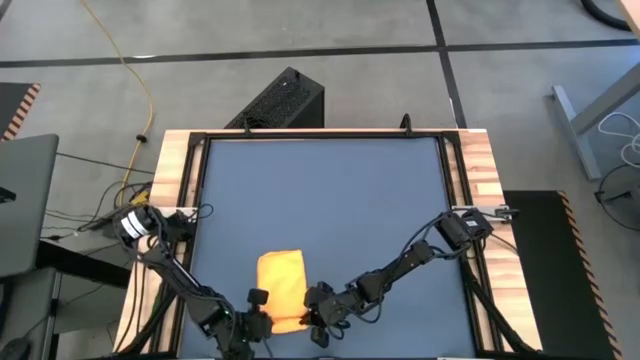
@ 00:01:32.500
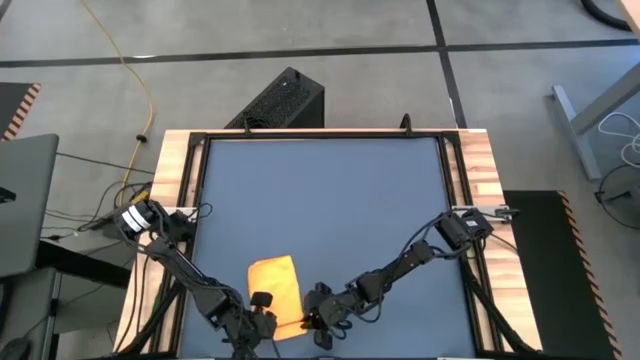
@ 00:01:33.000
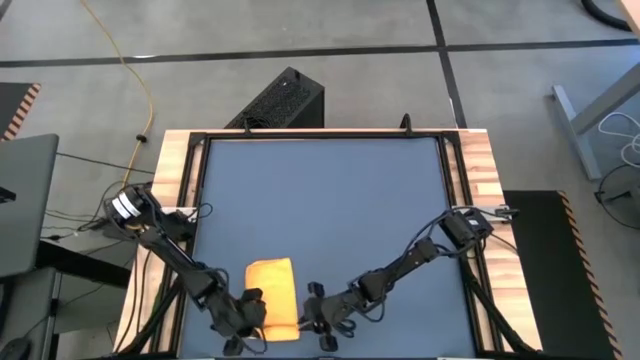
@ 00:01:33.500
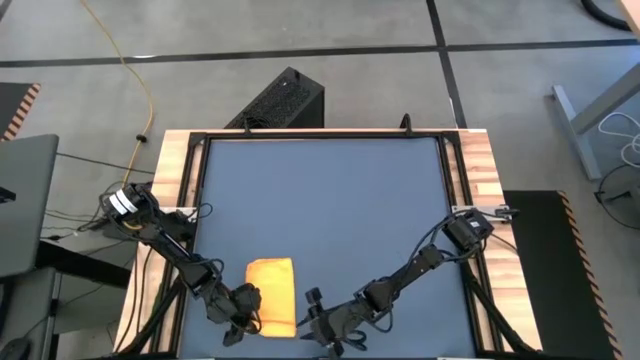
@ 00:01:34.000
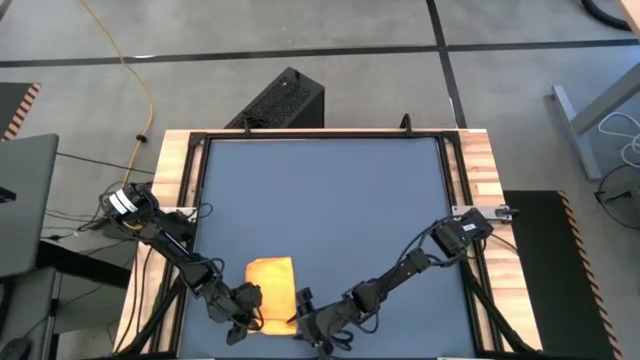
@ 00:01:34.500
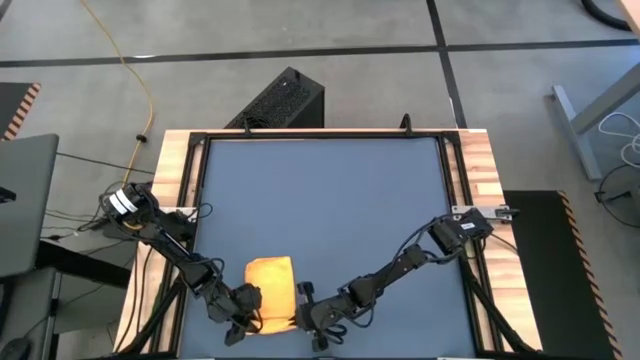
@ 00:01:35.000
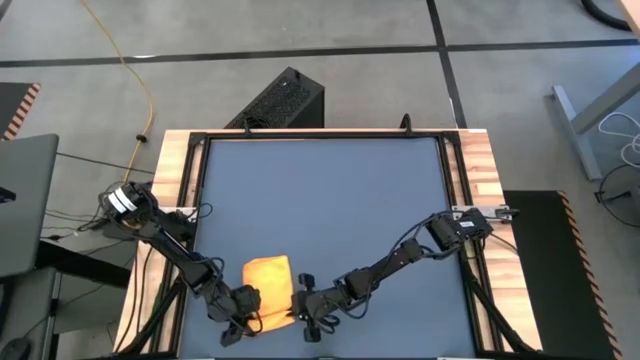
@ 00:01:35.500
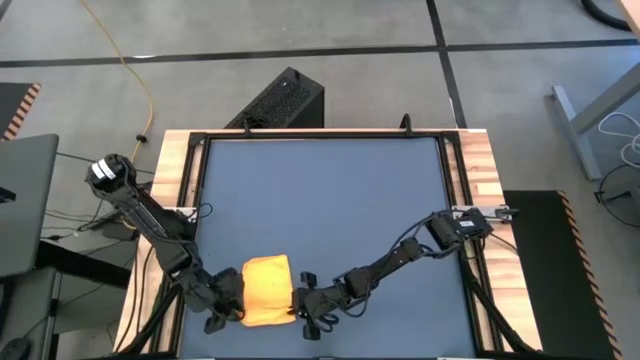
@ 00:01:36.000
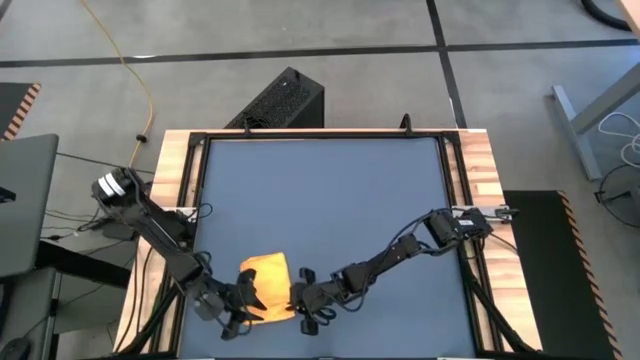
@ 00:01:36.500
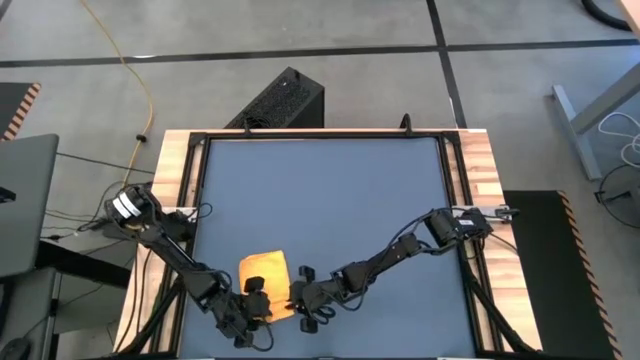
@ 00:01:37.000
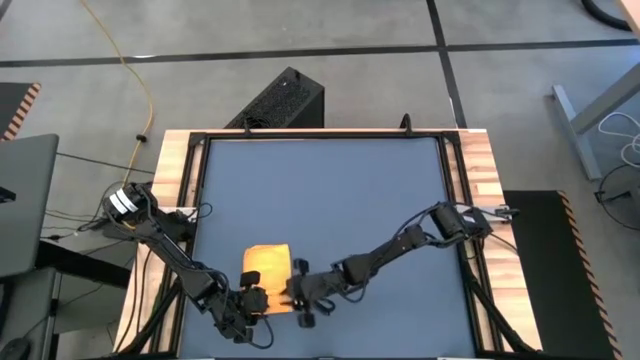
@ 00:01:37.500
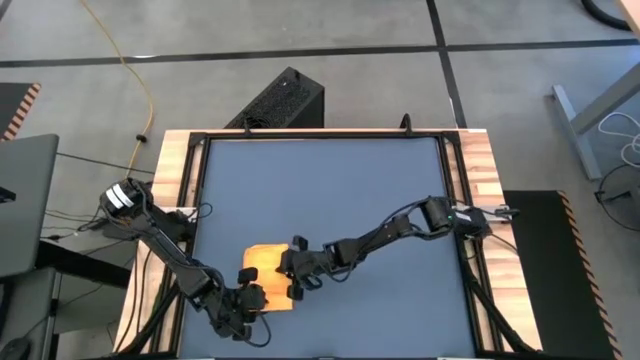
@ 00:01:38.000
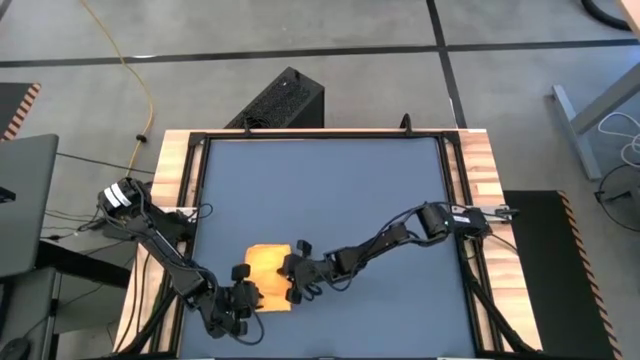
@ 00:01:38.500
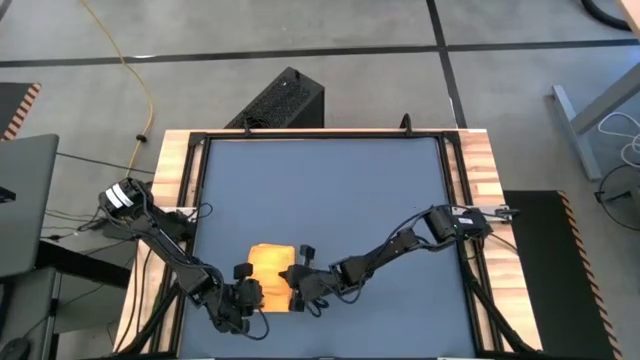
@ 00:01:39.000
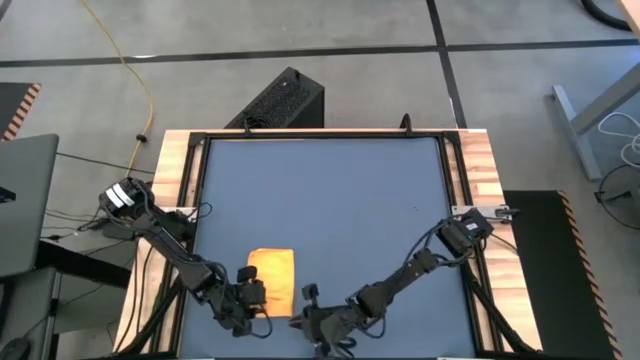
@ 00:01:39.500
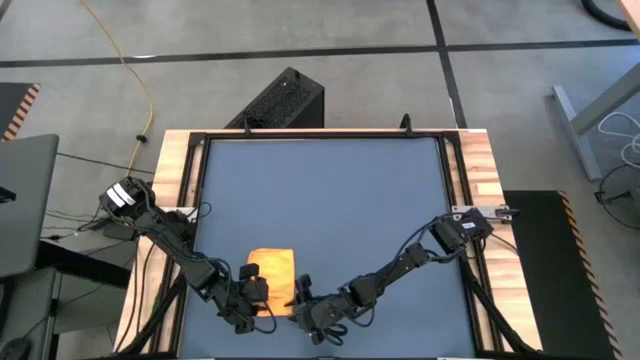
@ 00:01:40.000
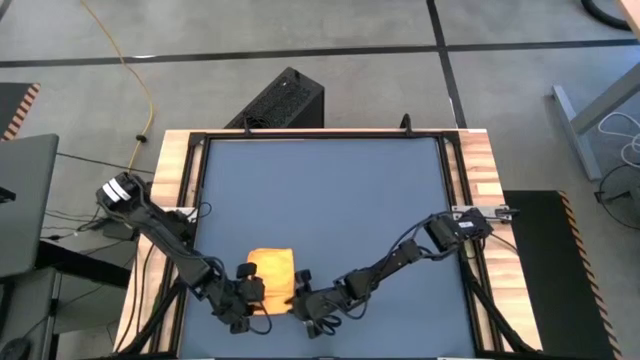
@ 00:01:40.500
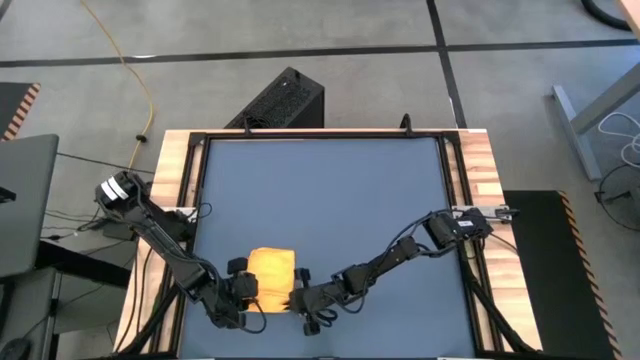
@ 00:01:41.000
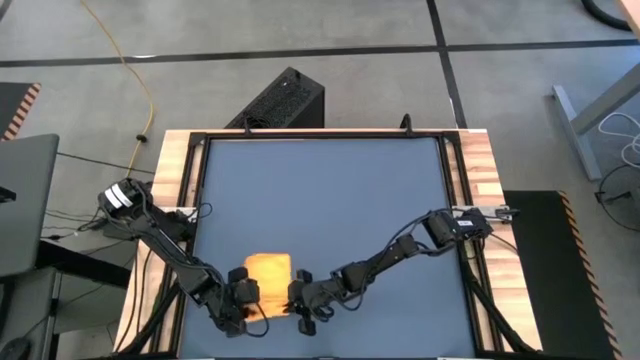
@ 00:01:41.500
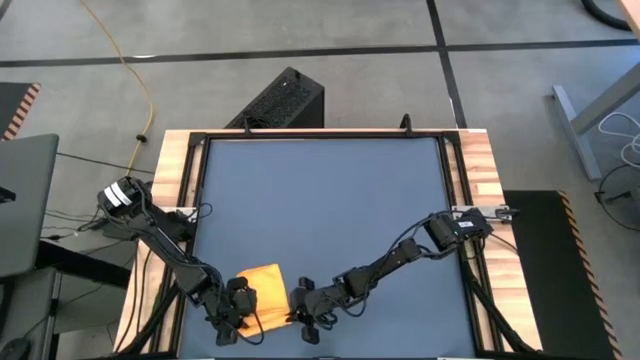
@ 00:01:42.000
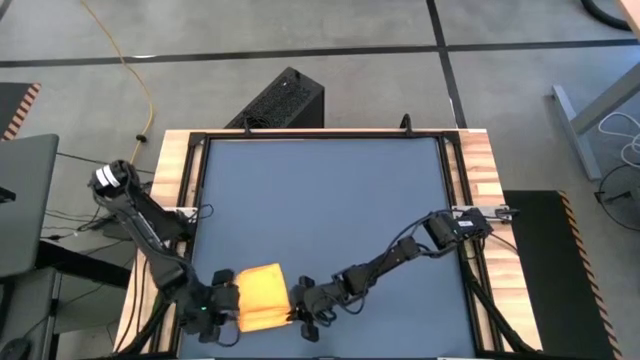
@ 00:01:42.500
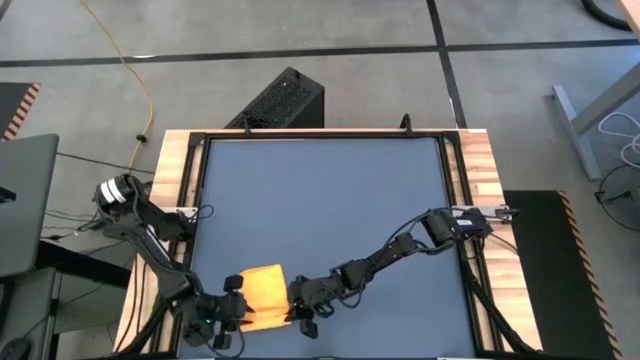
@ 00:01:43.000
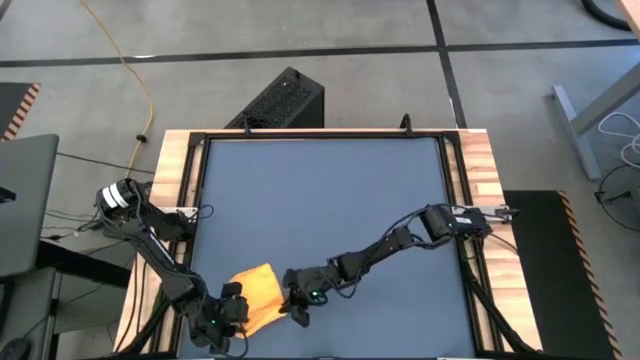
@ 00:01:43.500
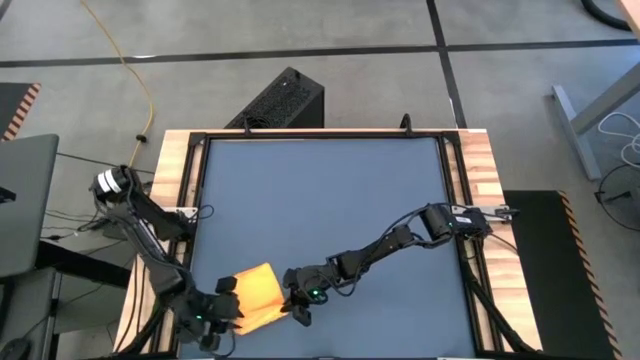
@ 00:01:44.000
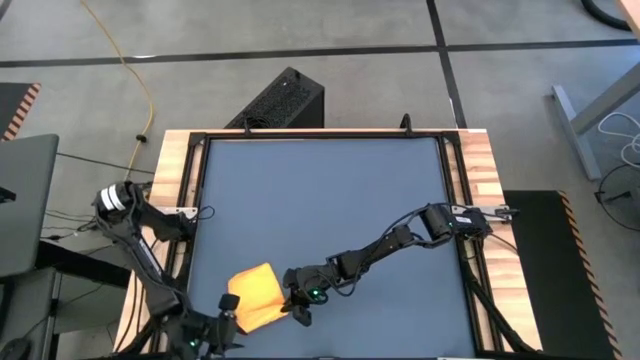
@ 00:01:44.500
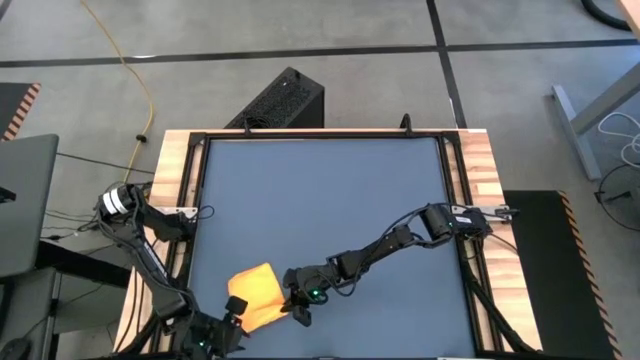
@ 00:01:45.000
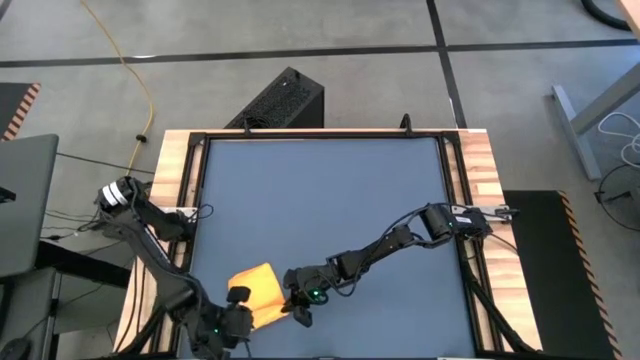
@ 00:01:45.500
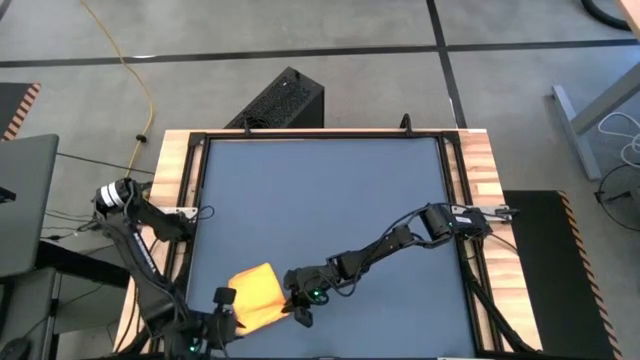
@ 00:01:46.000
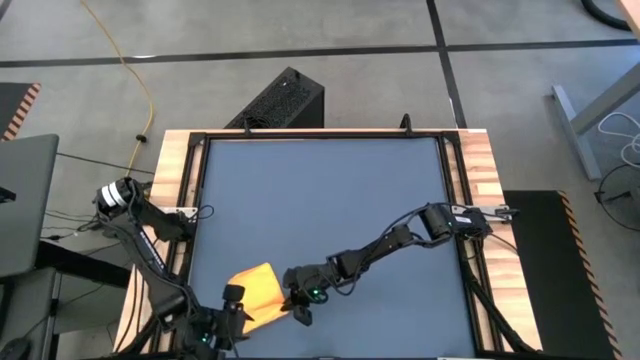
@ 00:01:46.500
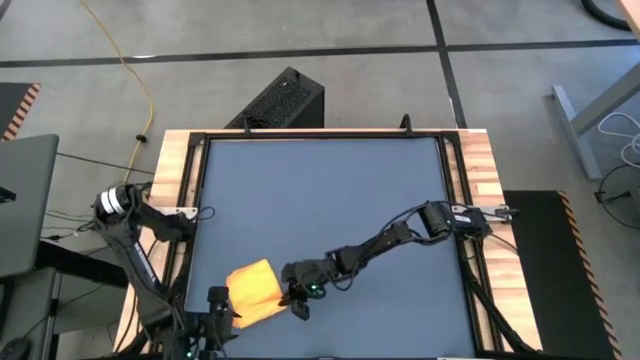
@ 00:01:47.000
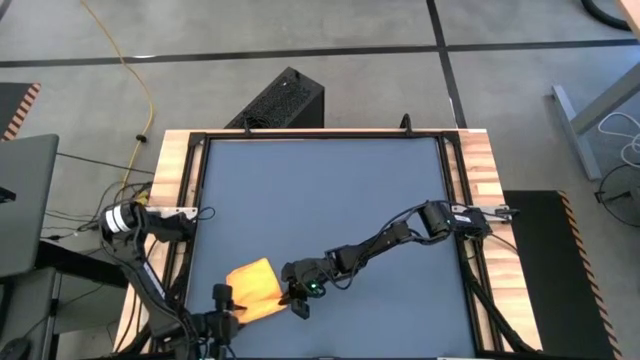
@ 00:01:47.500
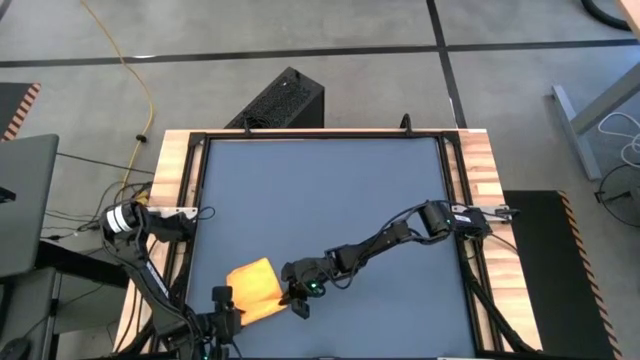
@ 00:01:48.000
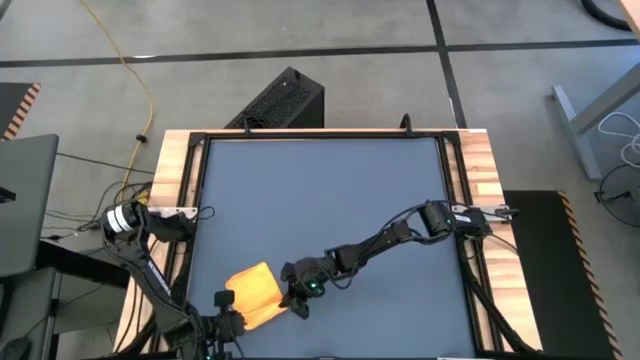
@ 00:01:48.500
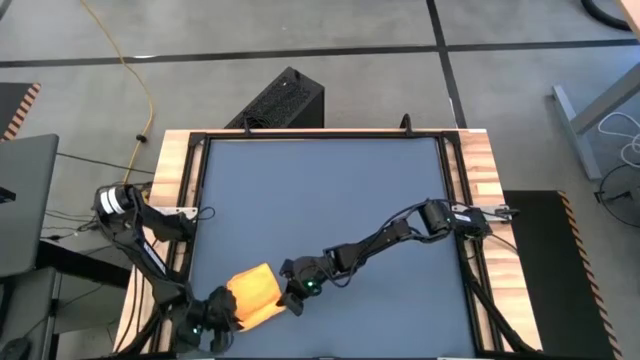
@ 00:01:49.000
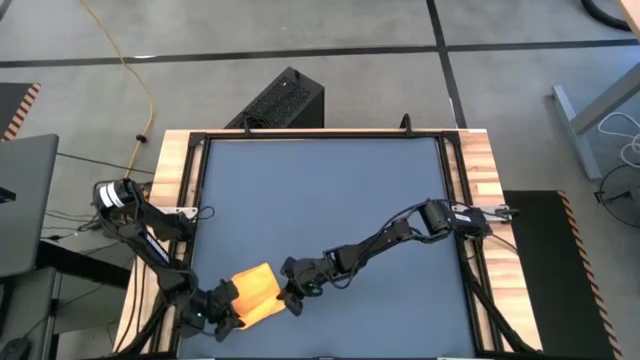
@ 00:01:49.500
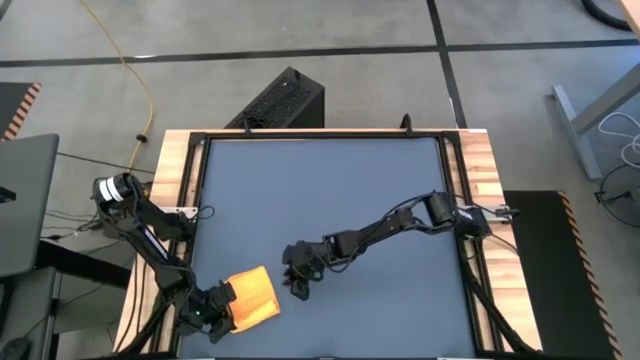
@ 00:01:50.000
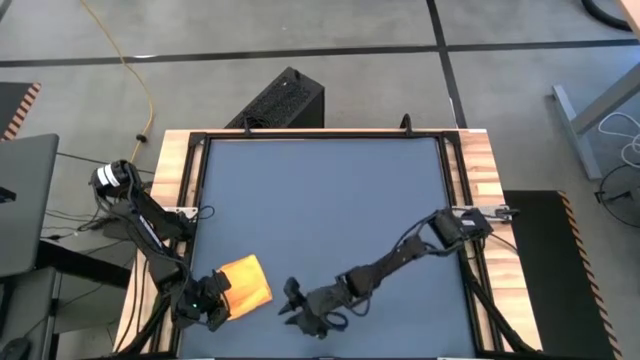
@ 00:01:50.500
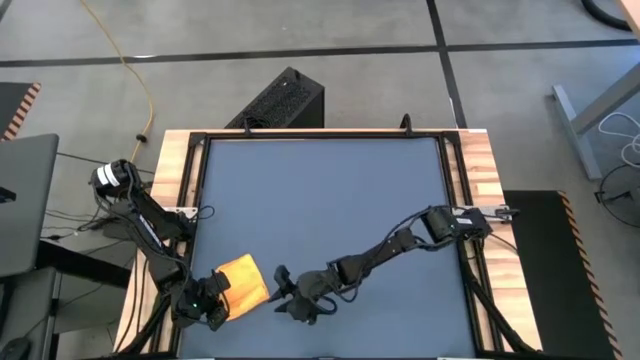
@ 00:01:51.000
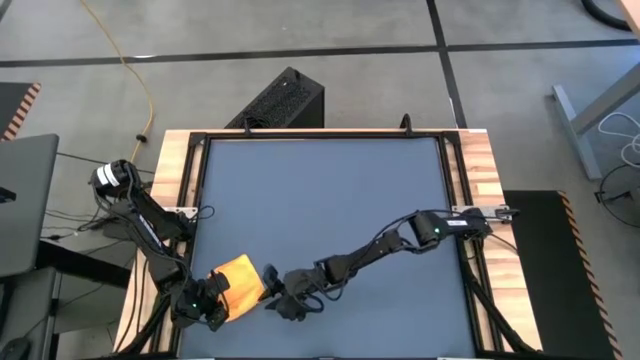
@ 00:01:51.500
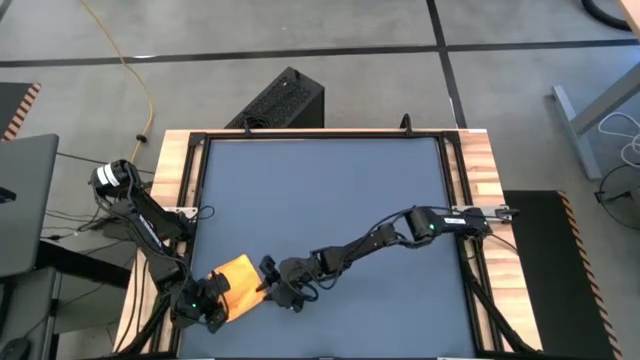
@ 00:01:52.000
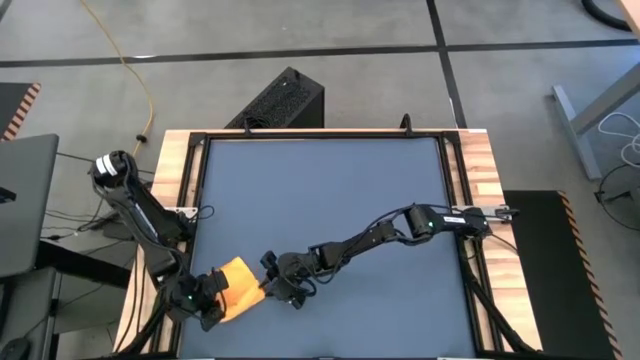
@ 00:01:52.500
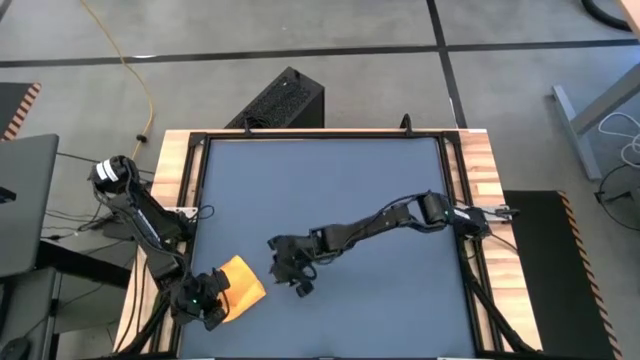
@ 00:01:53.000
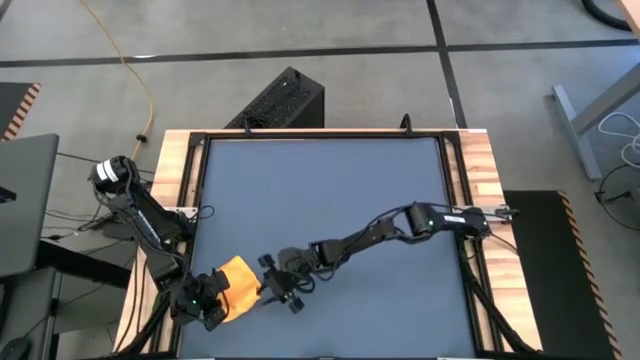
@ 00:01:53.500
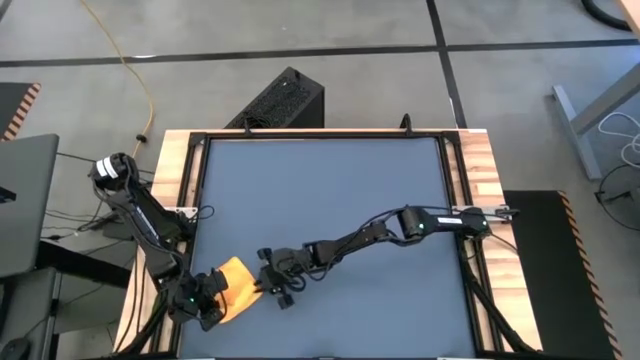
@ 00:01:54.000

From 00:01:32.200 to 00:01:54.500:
Task: Roll towel
Roll the orange microfiber towel
